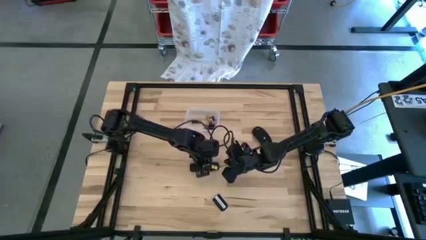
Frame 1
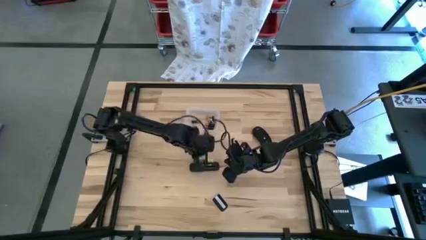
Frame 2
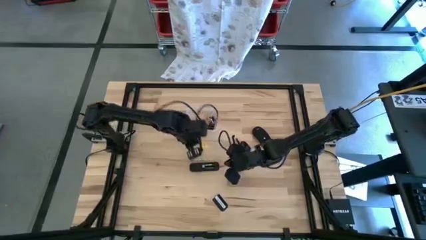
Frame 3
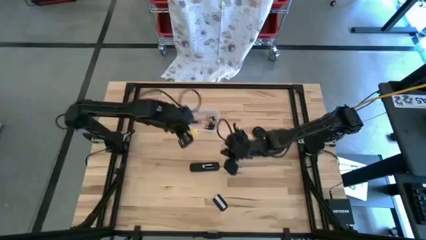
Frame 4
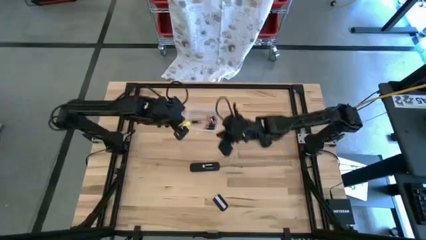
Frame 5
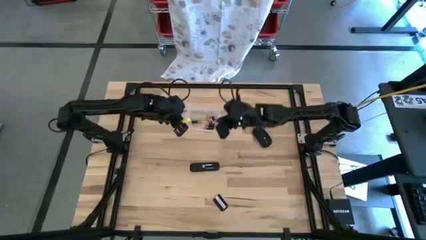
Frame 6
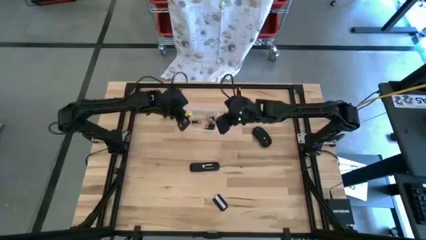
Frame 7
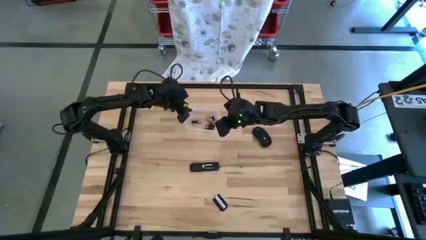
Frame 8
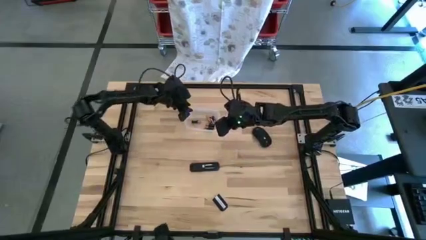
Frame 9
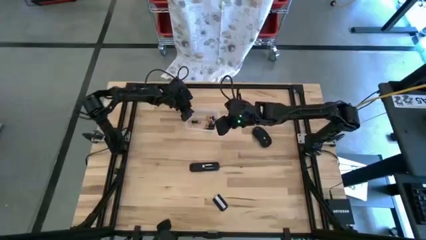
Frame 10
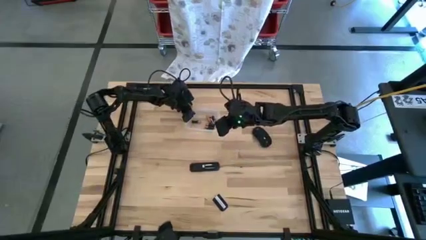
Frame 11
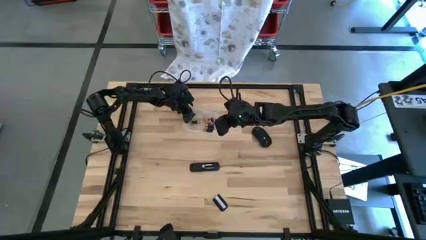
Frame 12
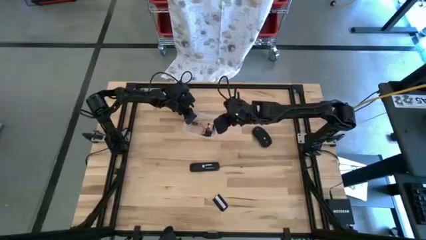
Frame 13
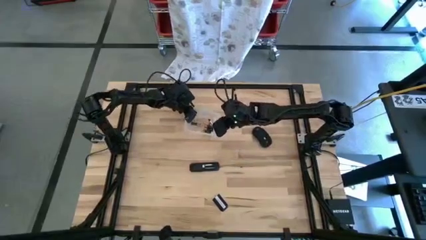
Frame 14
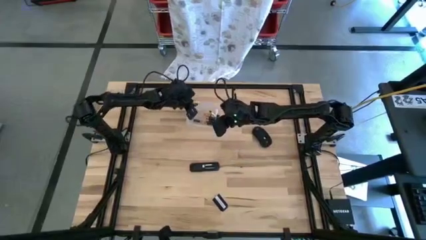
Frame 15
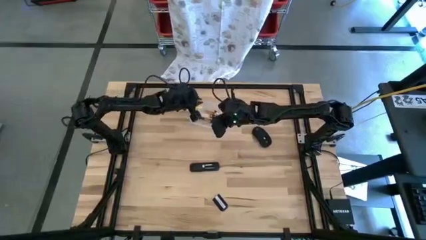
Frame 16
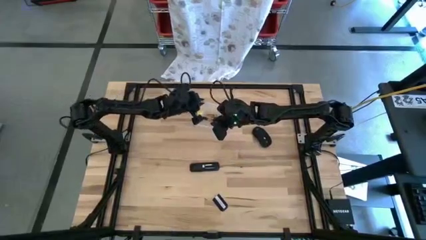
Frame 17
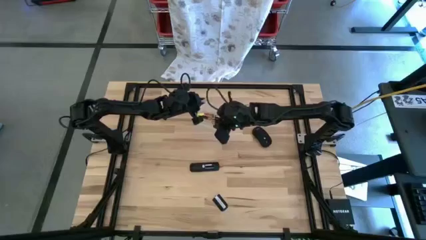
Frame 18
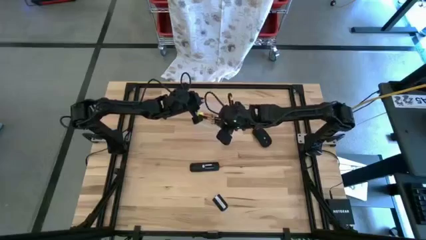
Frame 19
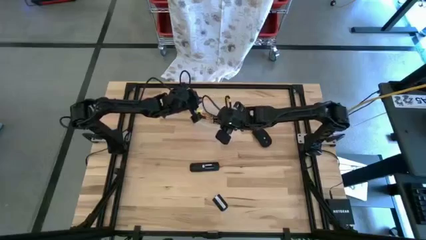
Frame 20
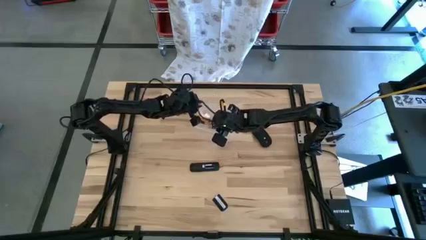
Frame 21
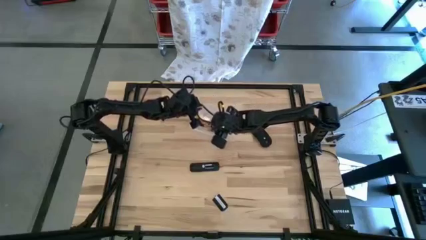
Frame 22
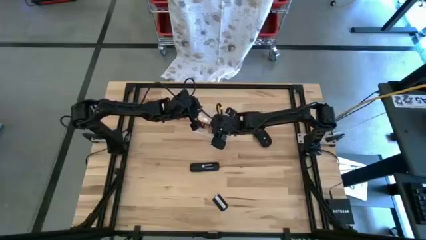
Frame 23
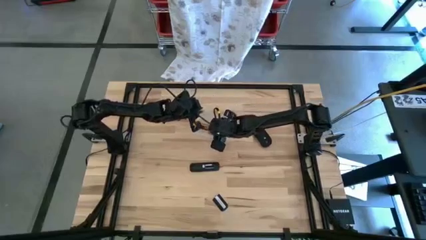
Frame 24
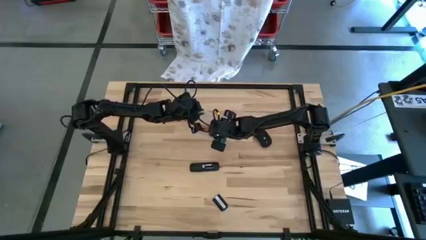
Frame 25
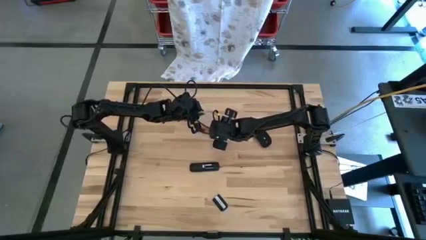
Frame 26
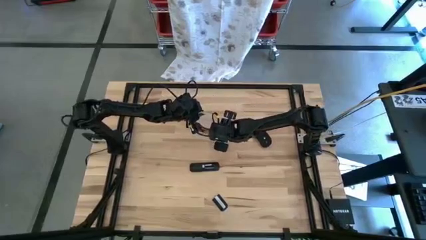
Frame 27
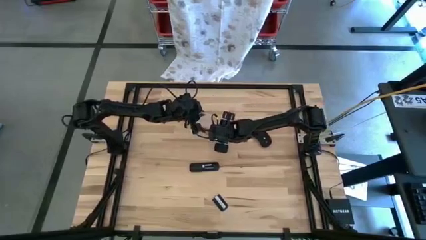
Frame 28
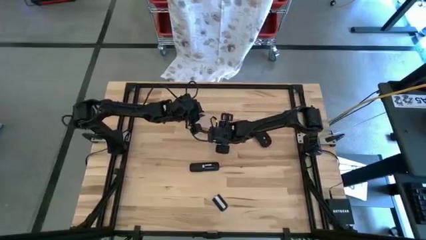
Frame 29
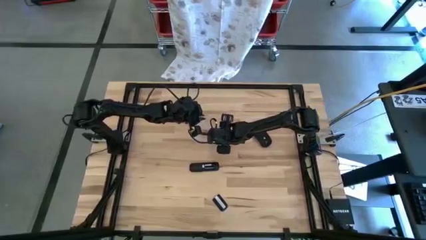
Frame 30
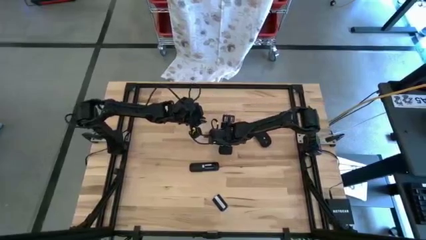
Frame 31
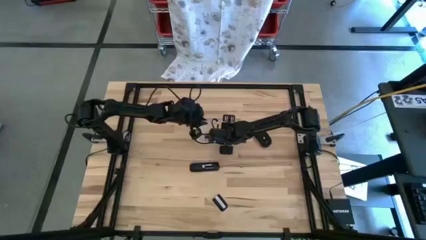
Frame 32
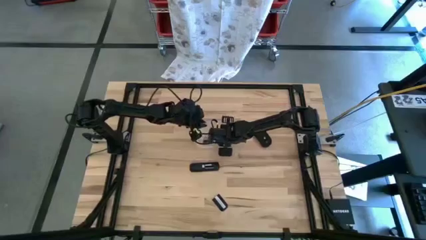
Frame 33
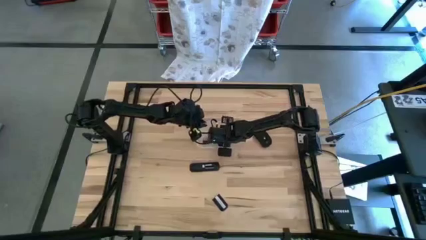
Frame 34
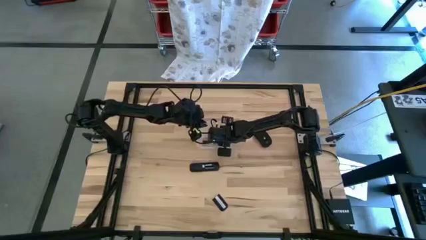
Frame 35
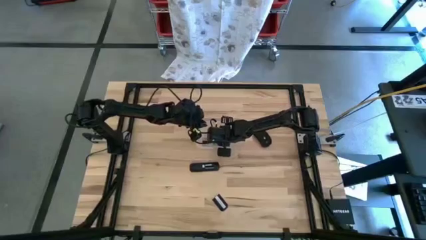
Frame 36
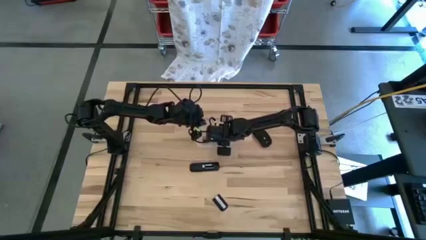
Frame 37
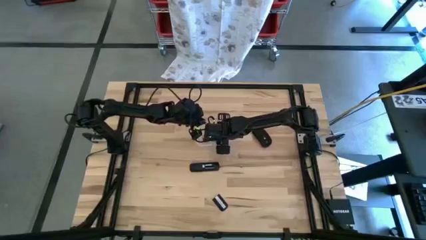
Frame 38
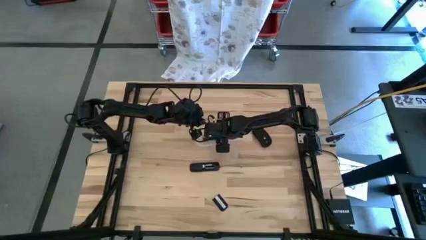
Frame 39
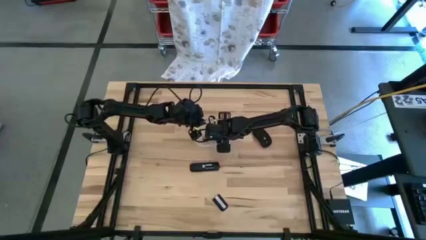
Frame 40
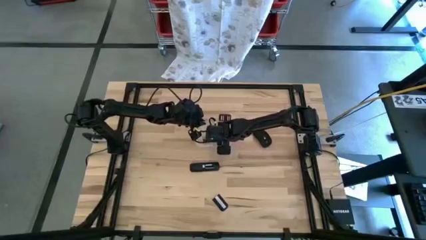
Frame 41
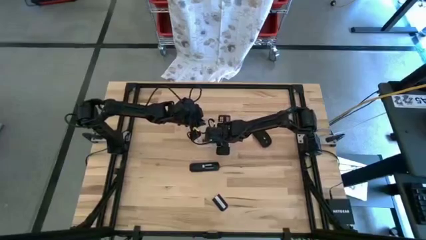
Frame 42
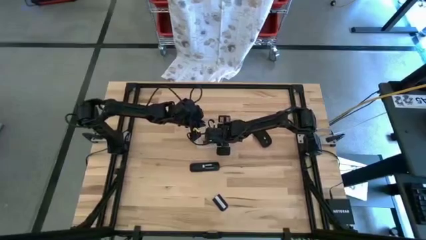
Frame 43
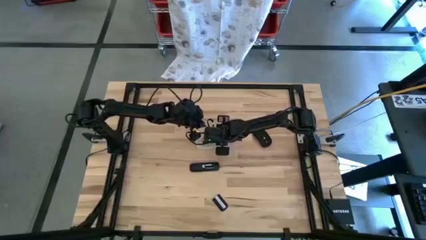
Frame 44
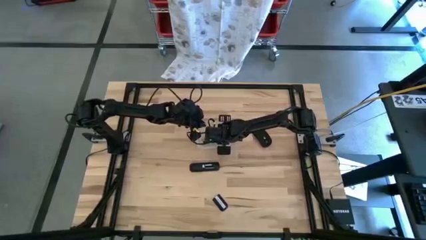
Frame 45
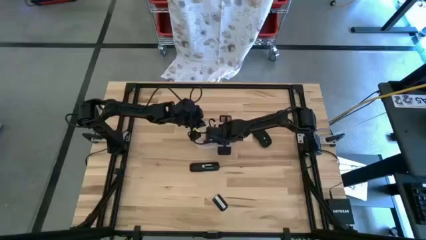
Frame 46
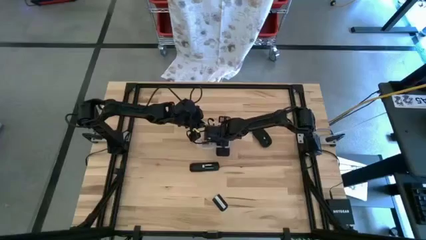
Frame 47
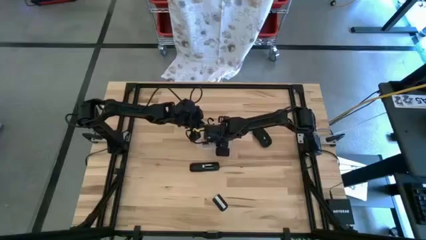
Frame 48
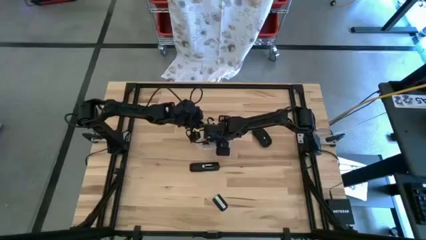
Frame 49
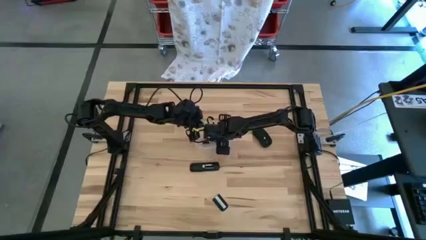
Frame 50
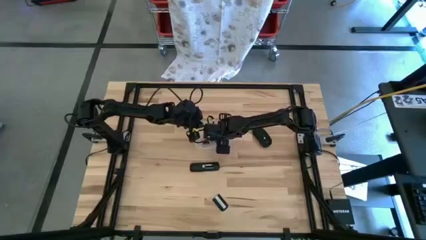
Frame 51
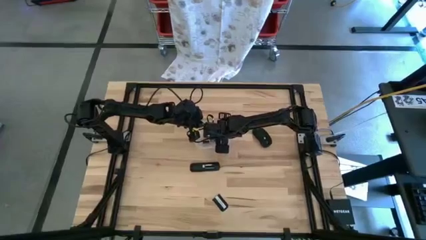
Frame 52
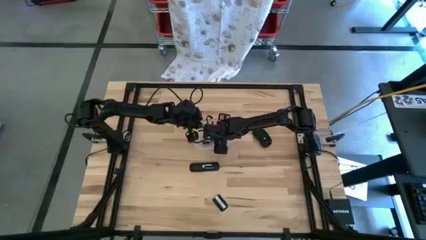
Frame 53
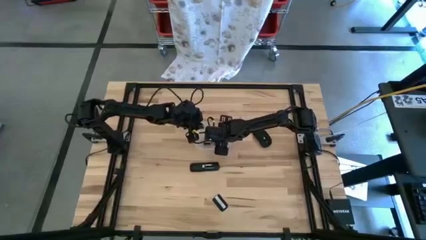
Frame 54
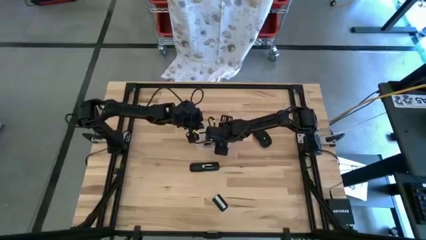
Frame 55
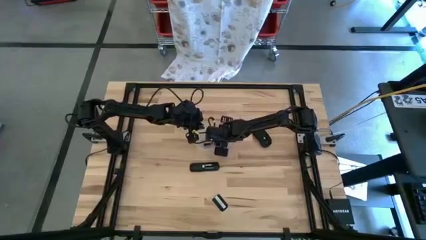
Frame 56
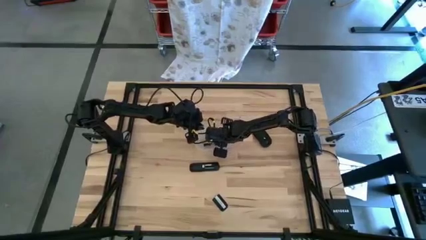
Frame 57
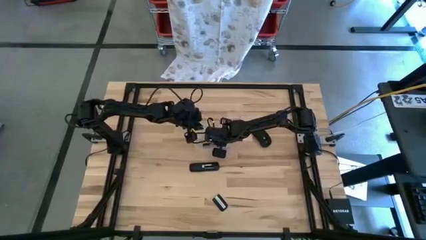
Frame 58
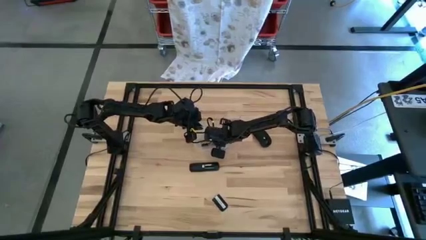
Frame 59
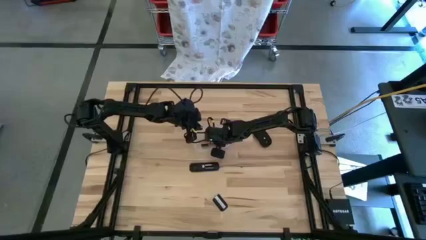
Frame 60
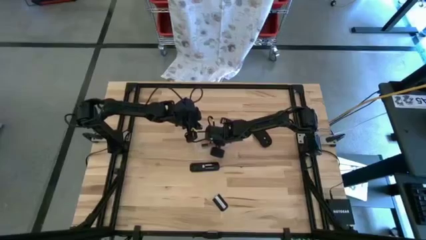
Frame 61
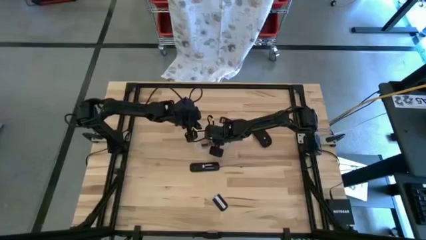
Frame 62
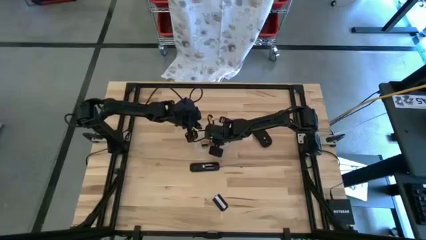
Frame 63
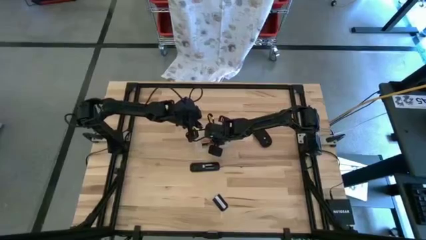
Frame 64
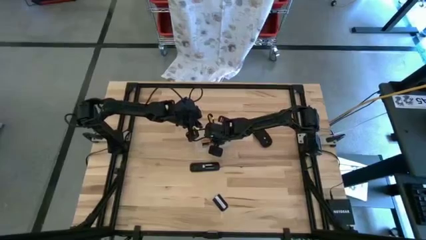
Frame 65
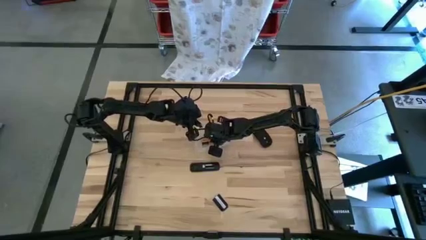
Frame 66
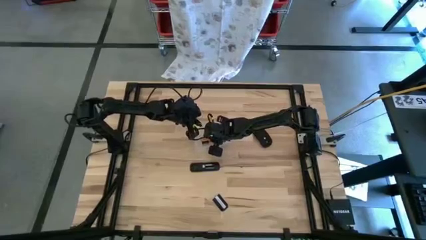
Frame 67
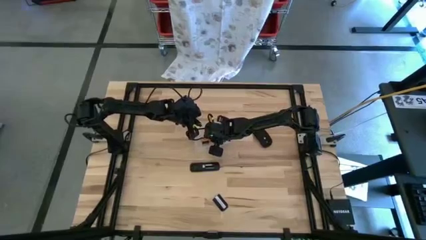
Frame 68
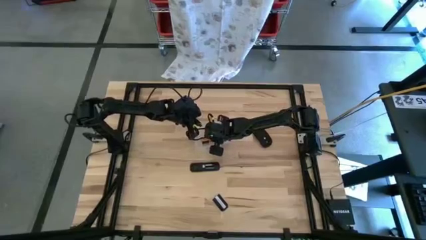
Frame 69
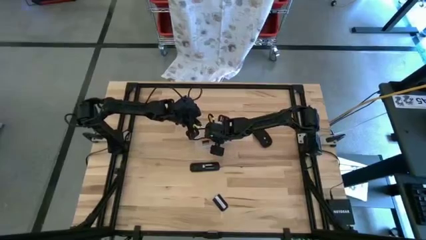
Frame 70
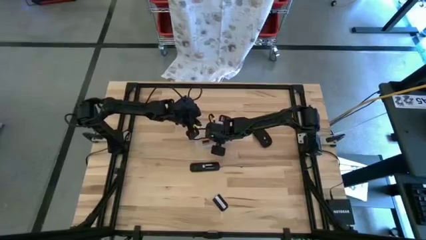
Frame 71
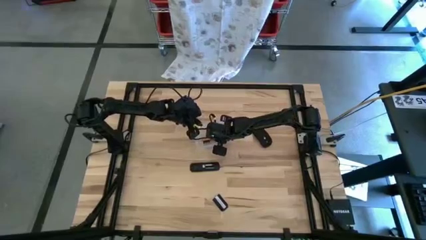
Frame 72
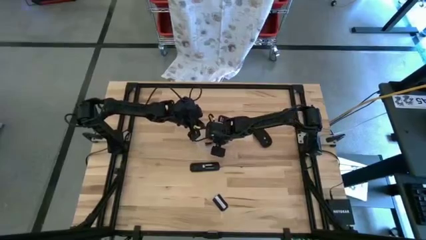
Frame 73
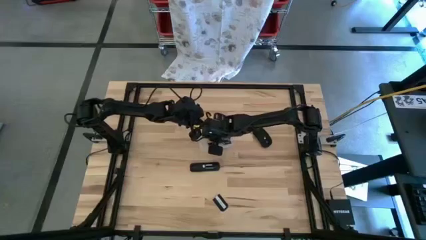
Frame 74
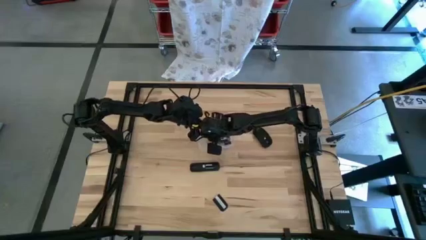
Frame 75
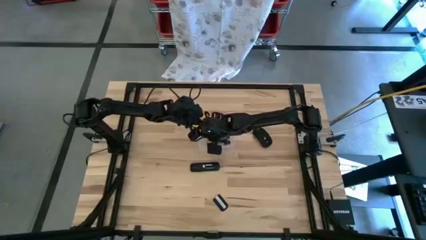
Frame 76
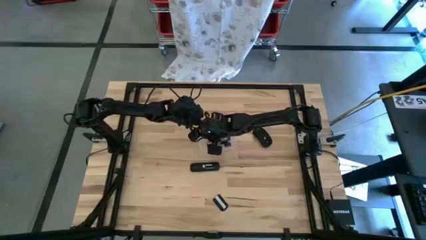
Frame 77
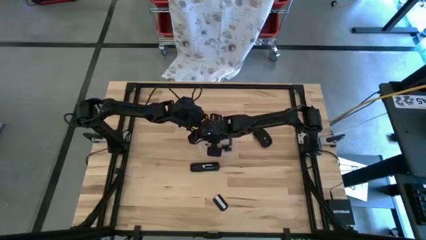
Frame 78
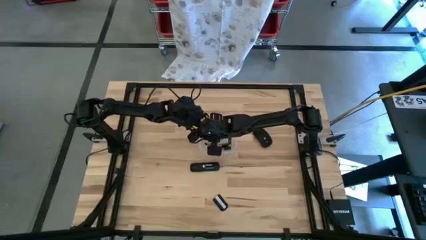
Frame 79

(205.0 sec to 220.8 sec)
Task: Insert battery
Insert the silver battery into the remote
